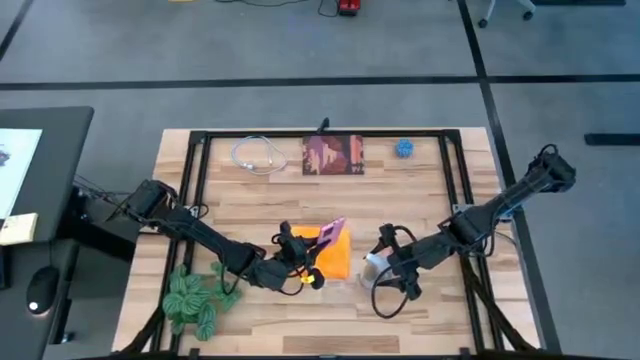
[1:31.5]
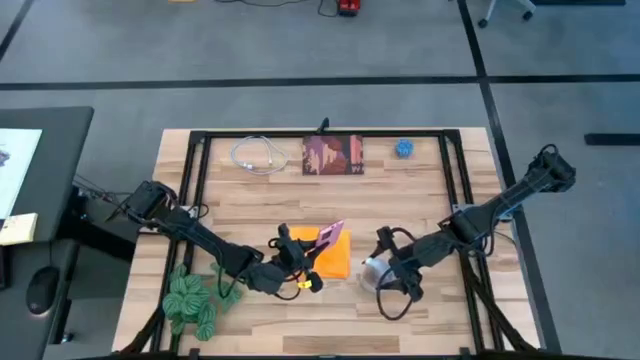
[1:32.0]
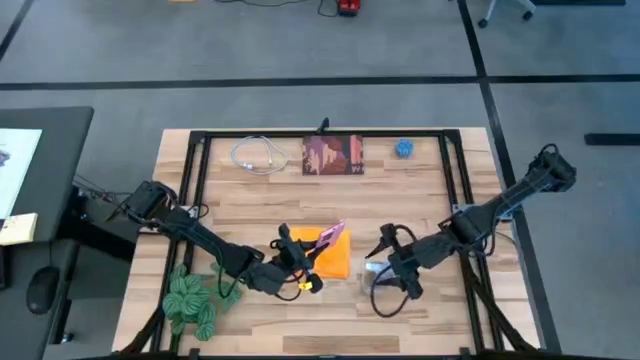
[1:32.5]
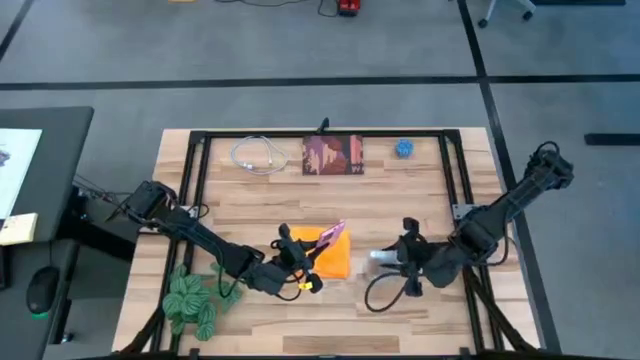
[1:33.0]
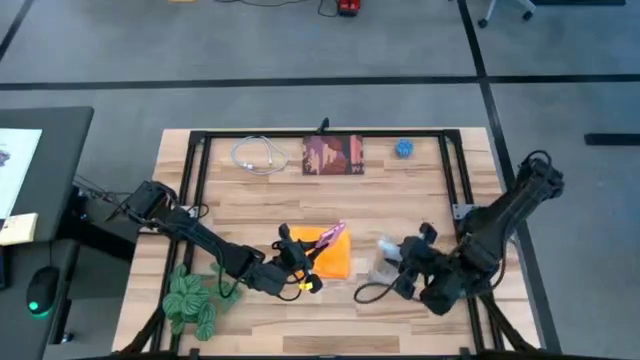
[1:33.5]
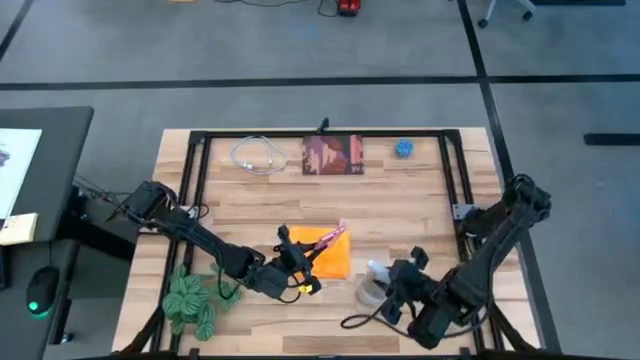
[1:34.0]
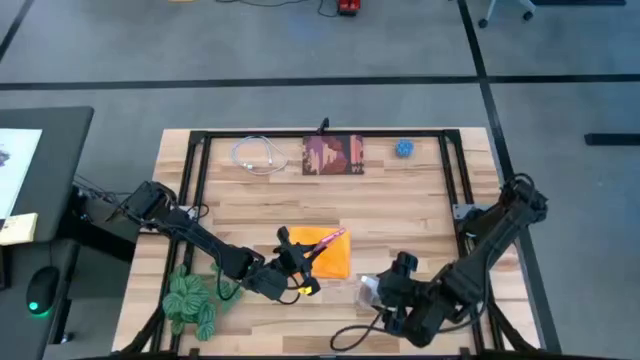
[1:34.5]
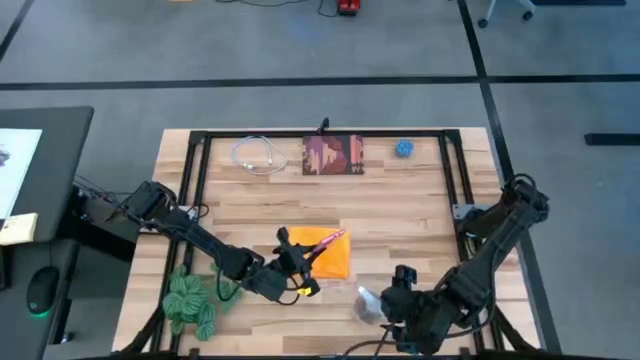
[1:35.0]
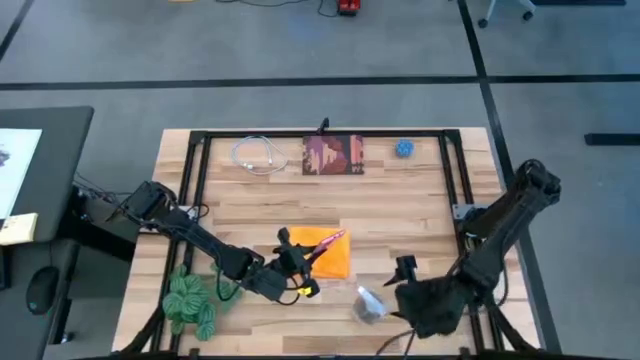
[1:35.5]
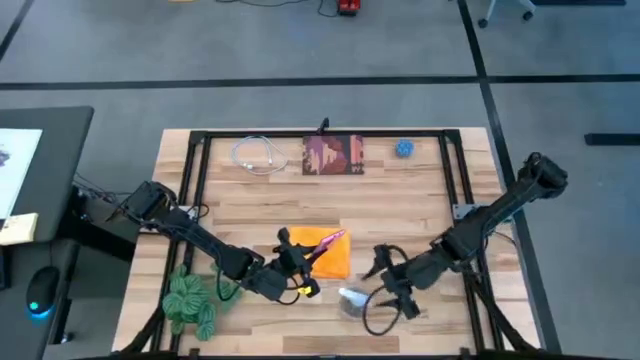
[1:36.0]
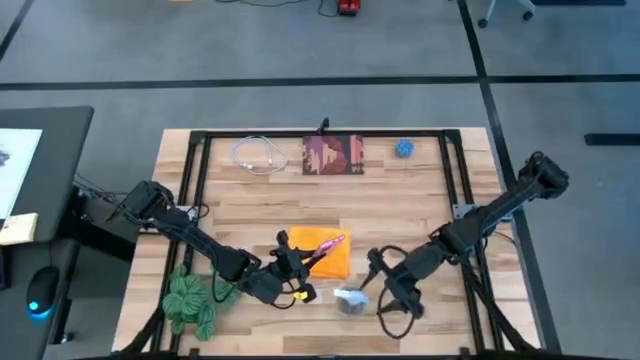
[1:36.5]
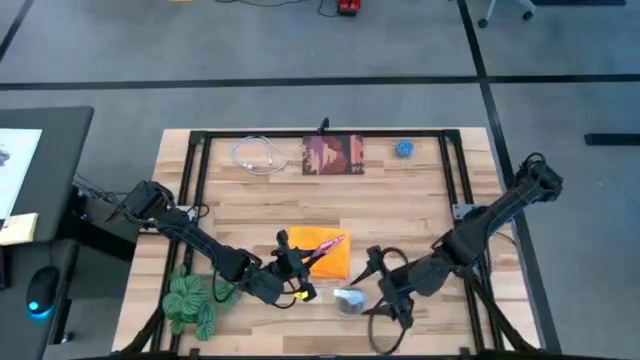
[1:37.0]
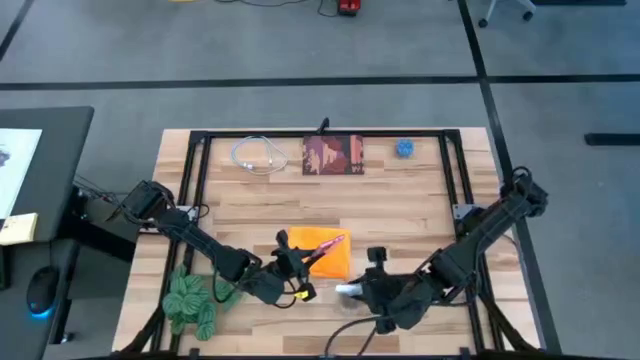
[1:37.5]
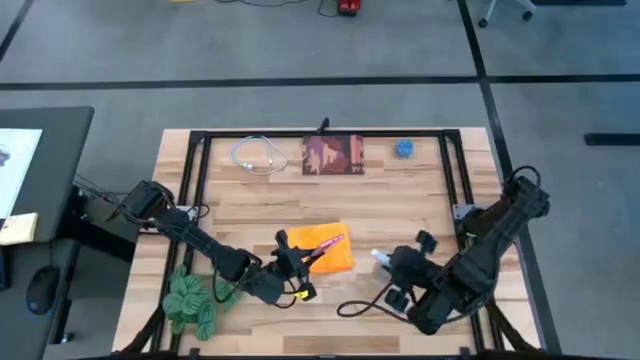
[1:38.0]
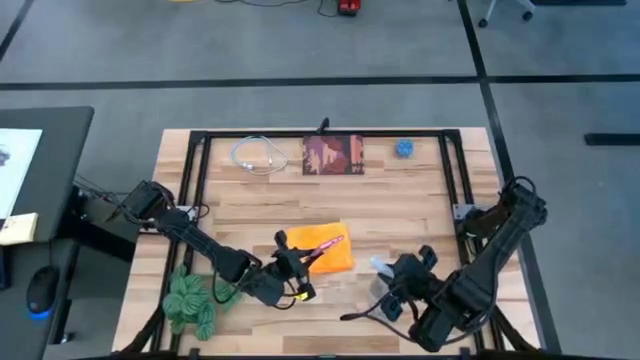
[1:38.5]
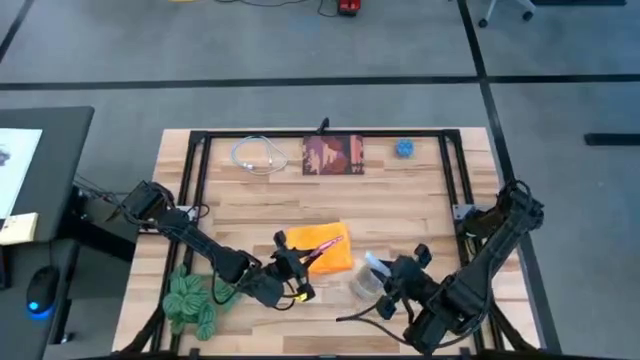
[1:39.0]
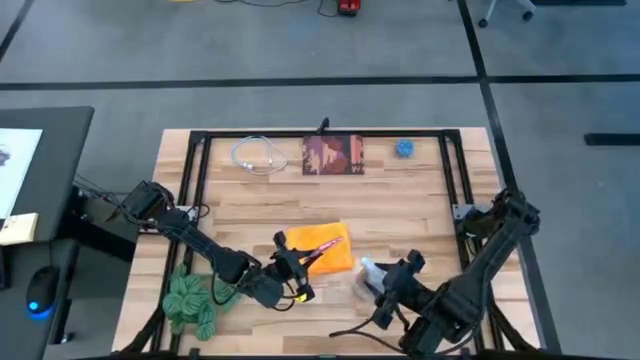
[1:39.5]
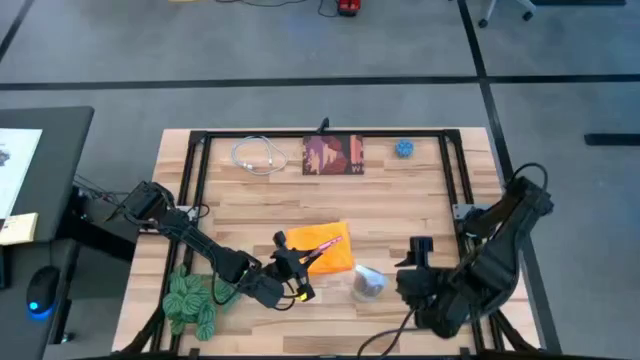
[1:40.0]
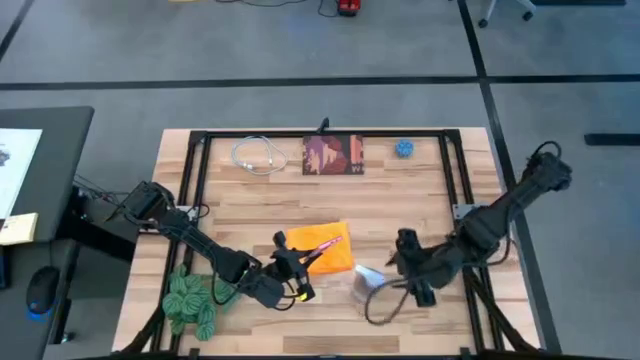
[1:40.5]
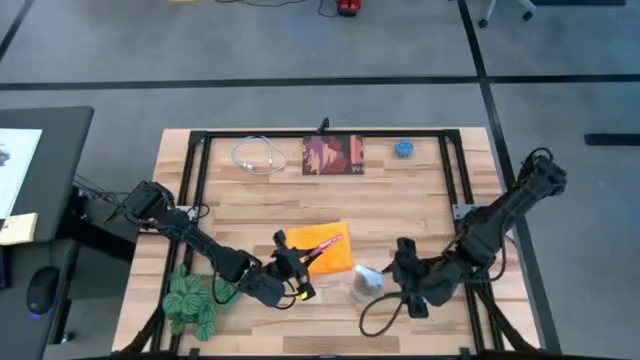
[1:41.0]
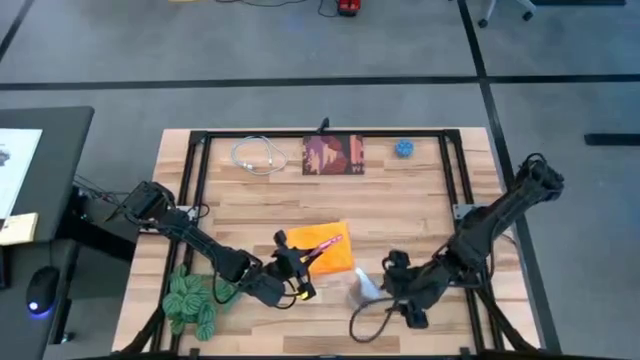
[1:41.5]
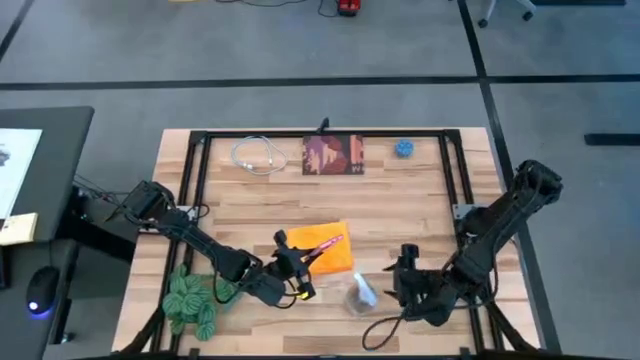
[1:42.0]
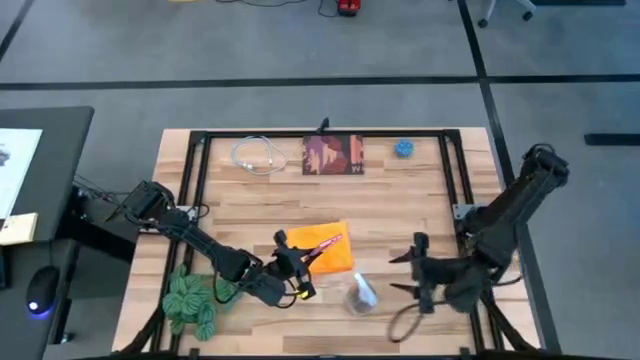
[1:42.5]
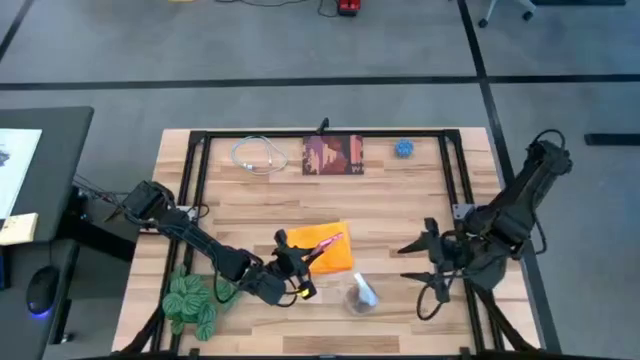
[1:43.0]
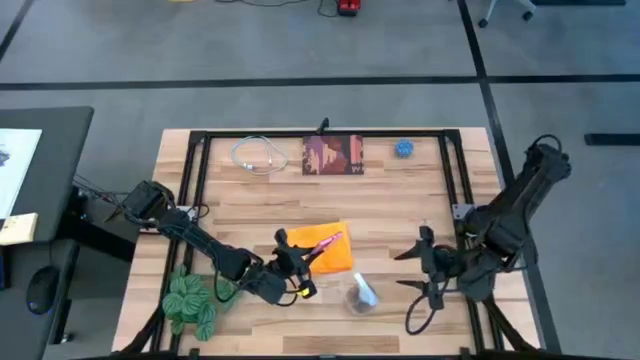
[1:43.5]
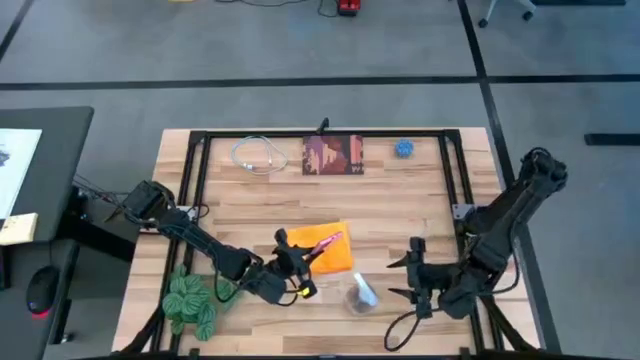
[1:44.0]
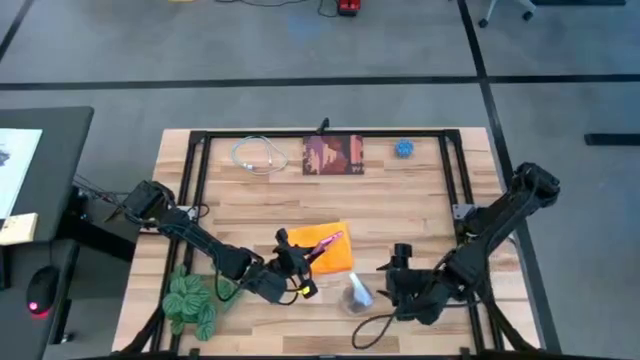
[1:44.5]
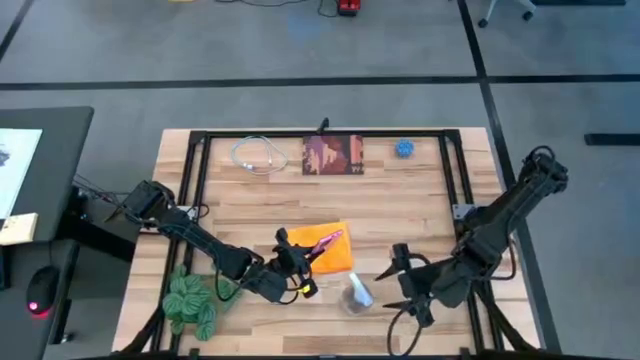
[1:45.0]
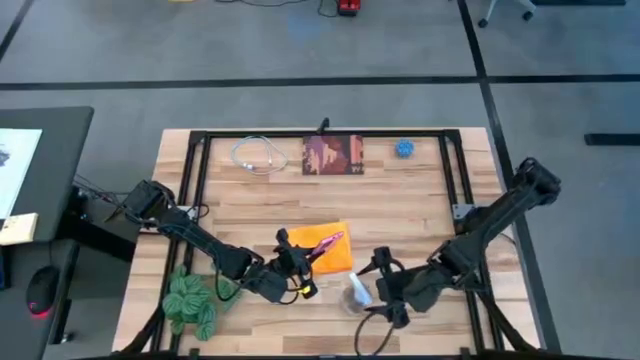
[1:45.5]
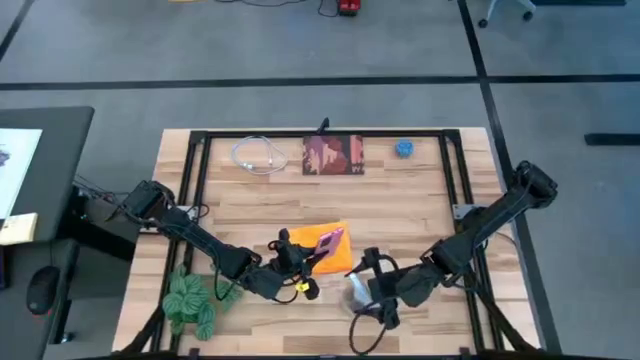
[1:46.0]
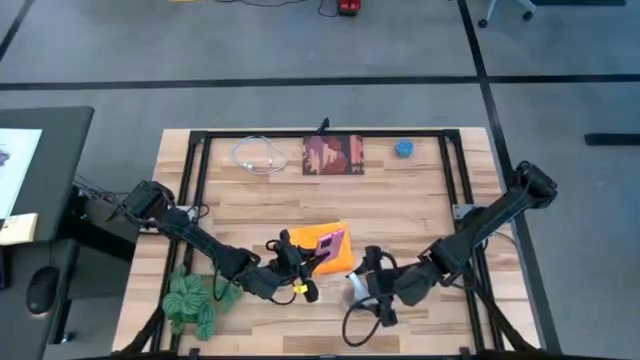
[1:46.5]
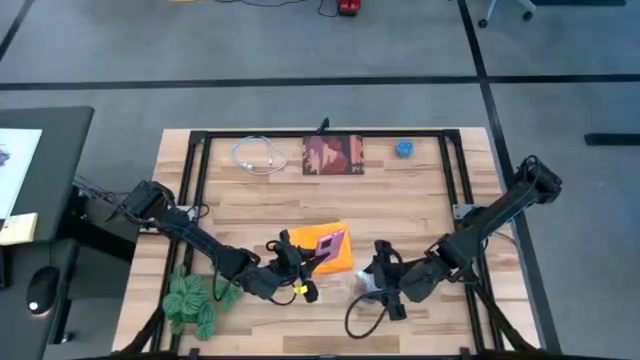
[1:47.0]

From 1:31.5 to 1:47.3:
Task: Apply microfiber cloth
Spray the back of the pink cellphone with the spray bottle
